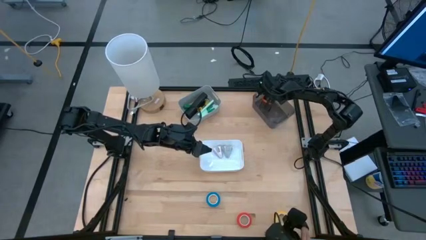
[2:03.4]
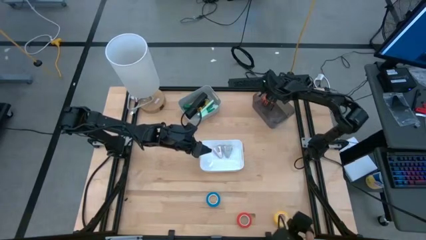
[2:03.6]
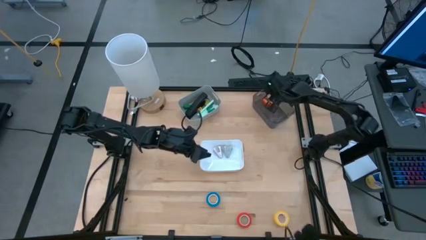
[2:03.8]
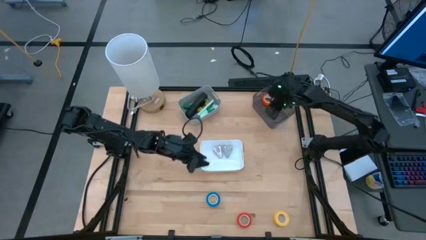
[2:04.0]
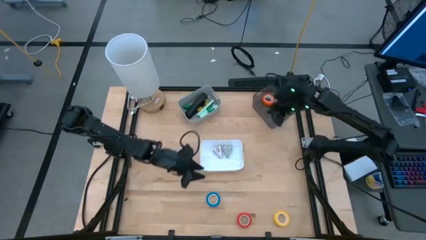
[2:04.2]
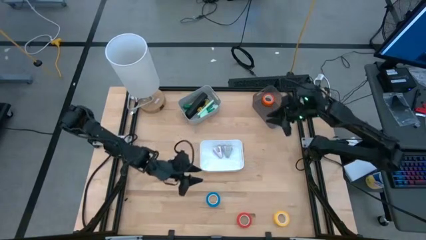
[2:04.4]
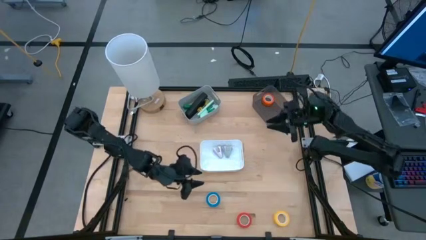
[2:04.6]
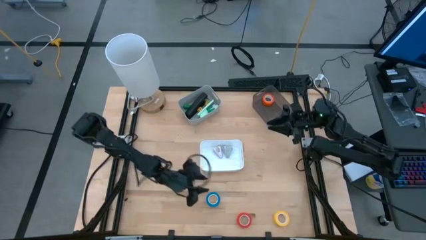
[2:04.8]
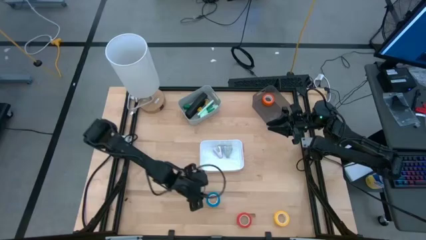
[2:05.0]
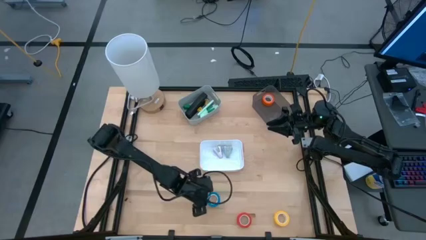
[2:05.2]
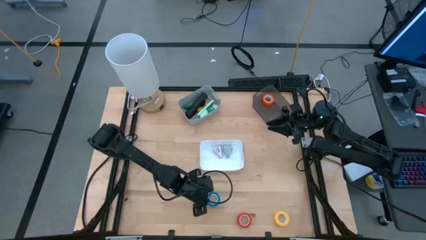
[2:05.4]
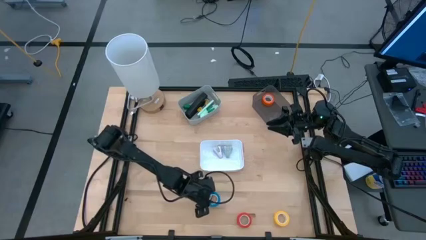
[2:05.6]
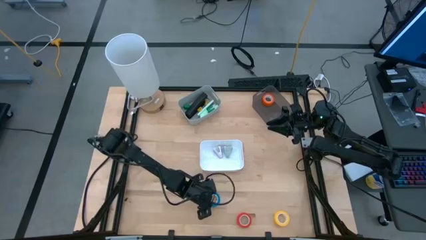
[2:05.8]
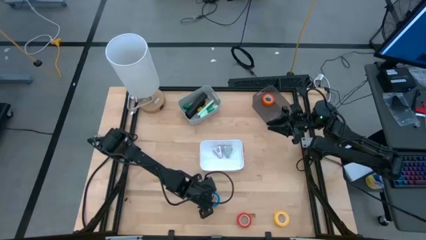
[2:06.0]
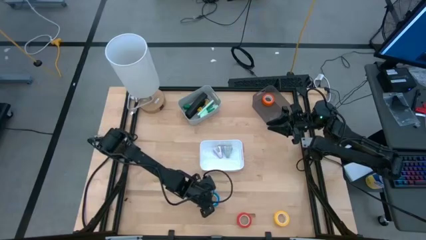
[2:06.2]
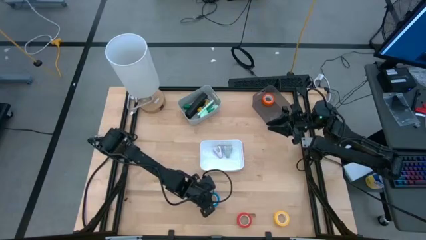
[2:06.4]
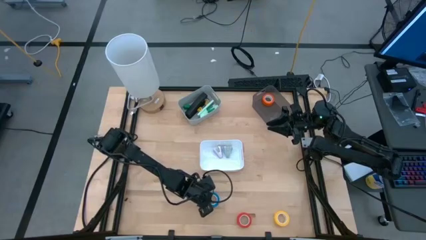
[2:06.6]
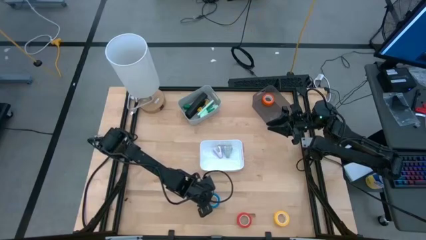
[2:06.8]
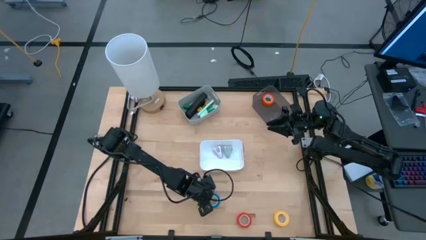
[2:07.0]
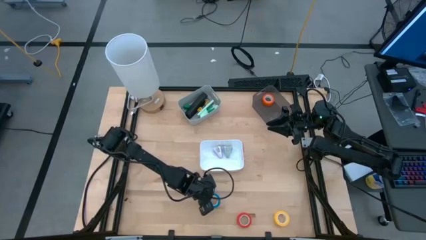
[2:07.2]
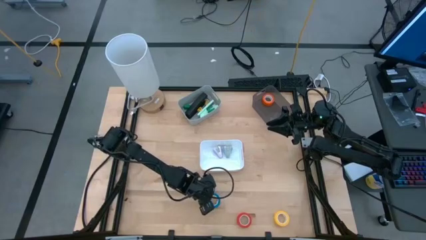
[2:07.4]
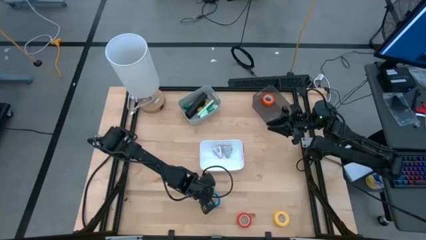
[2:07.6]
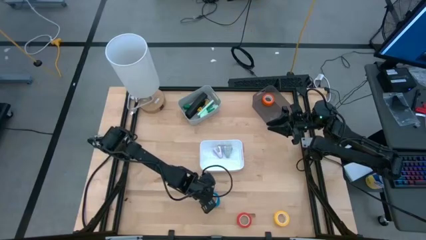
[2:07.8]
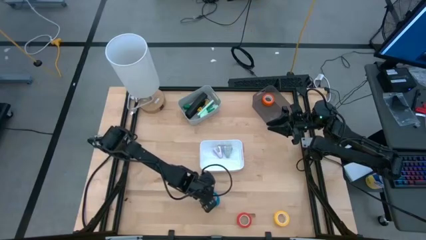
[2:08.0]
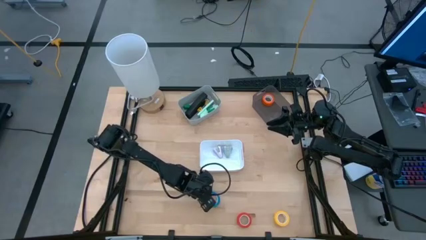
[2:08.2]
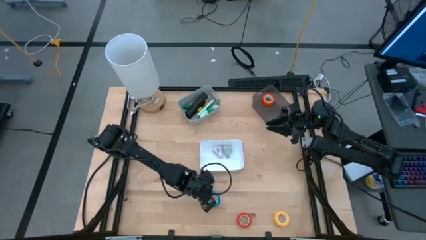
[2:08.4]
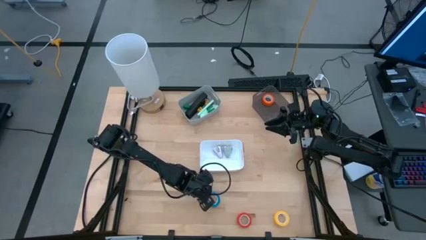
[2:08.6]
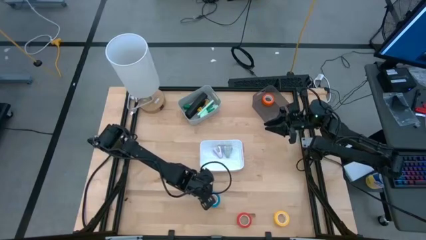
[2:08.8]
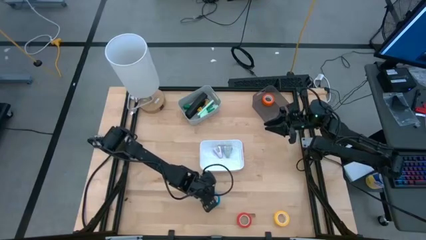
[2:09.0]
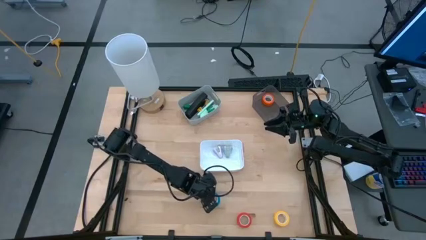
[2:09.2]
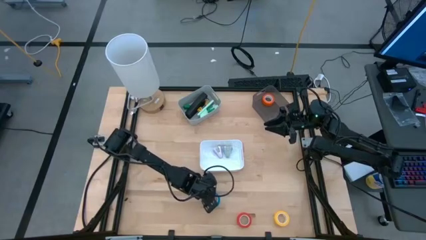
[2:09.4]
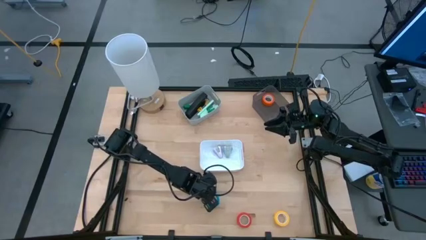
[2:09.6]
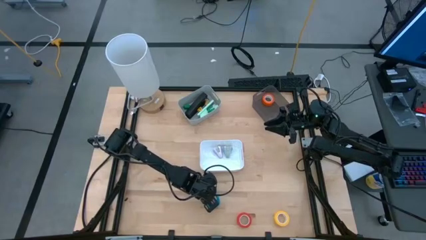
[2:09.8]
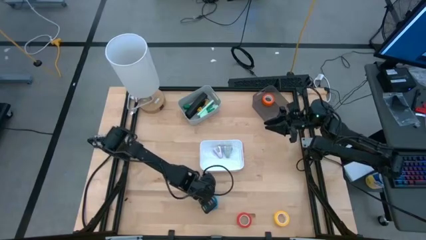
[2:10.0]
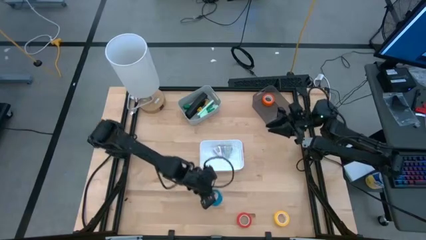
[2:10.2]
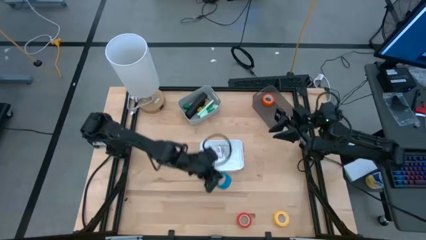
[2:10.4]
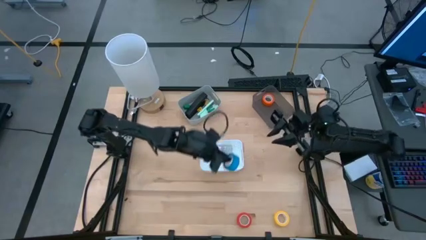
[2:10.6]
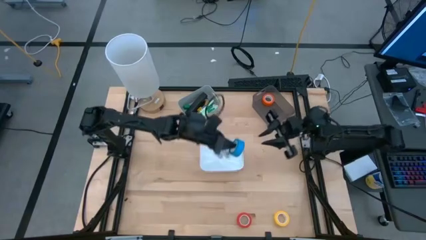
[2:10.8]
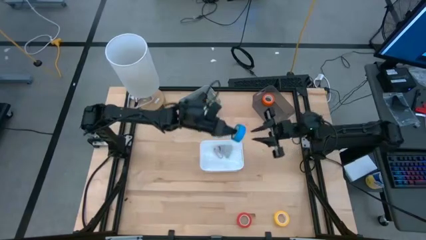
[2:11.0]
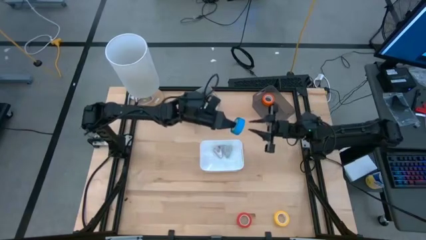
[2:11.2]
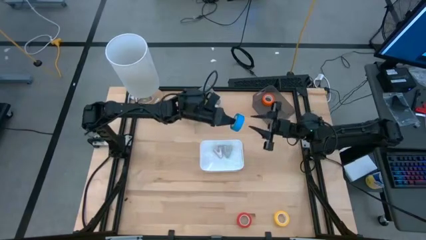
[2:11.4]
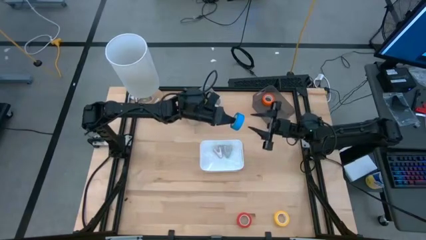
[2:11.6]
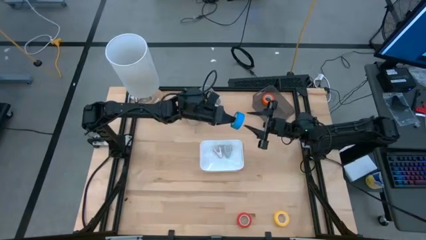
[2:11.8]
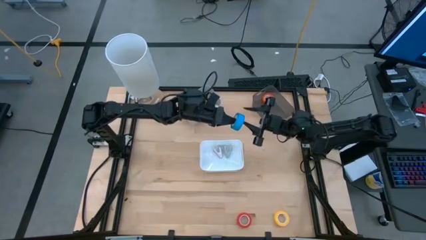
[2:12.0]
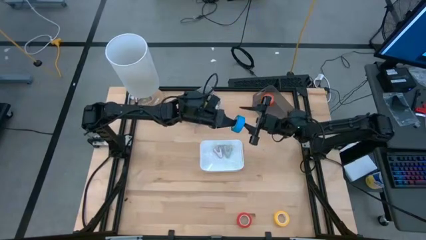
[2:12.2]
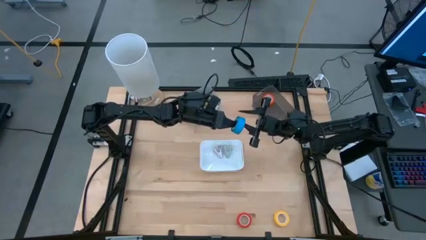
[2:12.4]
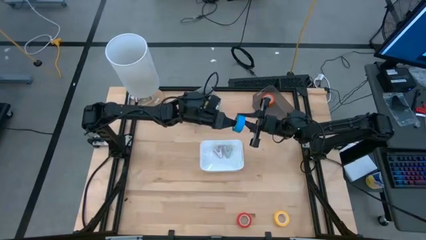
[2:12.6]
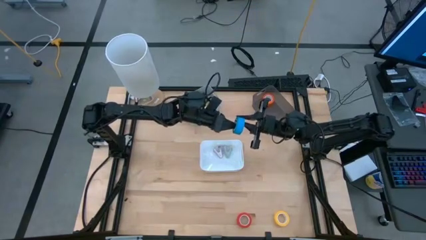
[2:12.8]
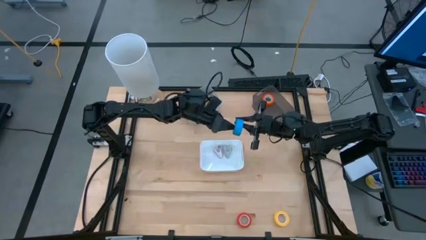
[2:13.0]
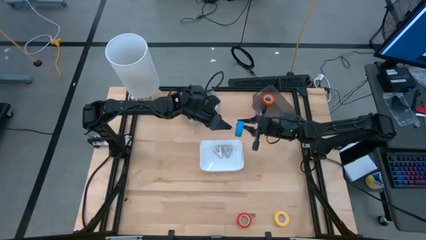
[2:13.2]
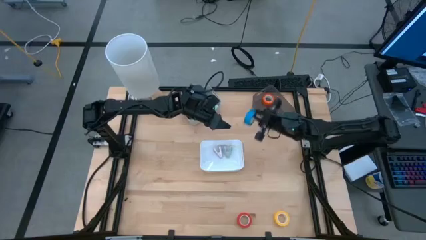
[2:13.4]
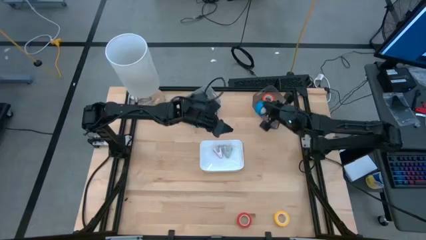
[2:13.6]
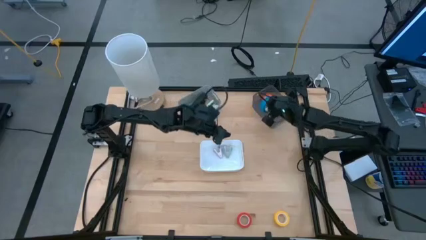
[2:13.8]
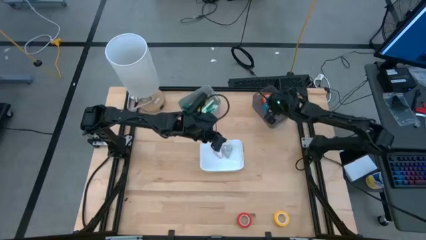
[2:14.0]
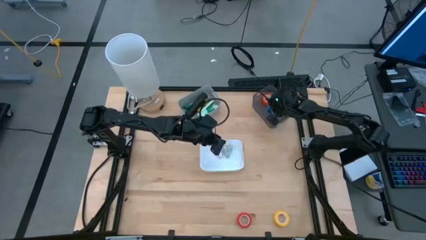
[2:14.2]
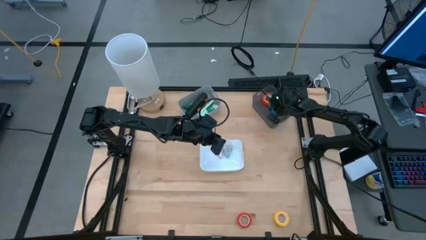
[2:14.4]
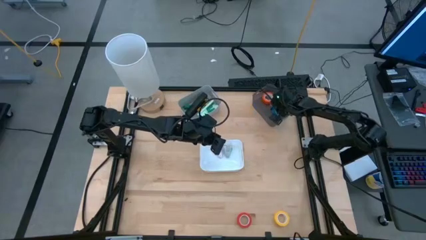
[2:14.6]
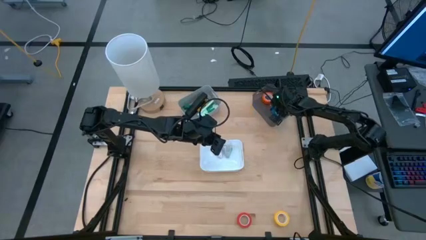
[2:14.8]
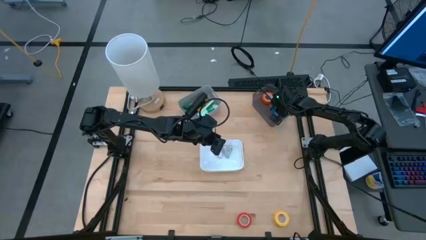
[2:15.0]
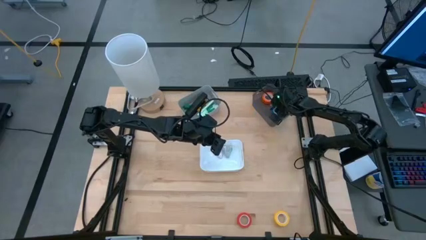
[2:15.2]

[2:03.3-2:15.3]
Task: Pick and place Stapler, Stapler remover, tape
Put the blue tape into the black bin

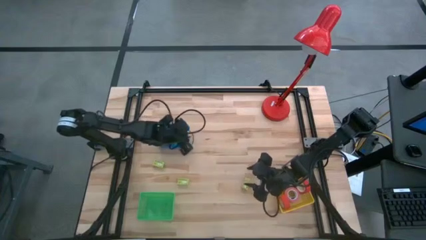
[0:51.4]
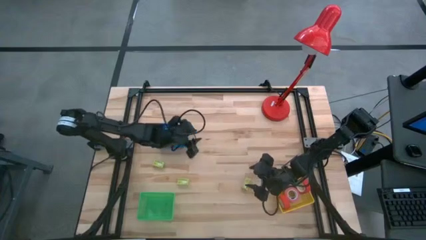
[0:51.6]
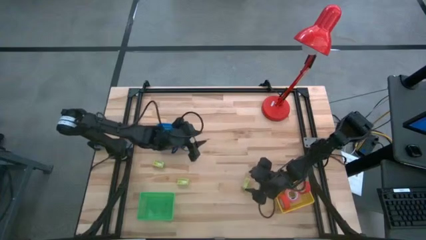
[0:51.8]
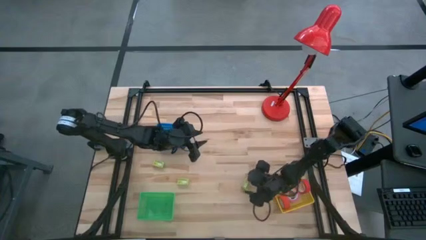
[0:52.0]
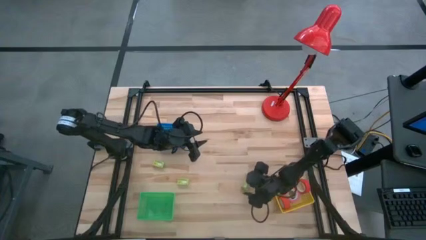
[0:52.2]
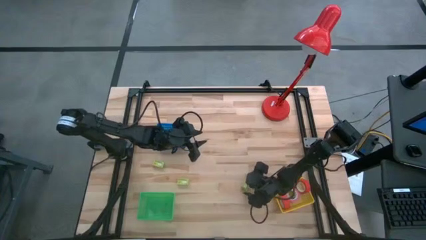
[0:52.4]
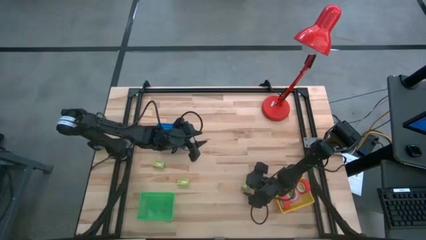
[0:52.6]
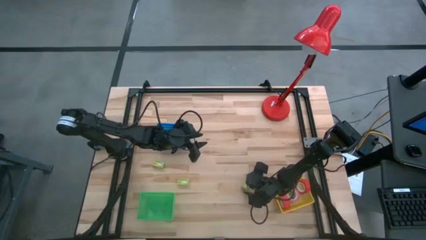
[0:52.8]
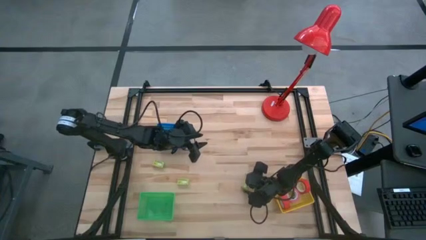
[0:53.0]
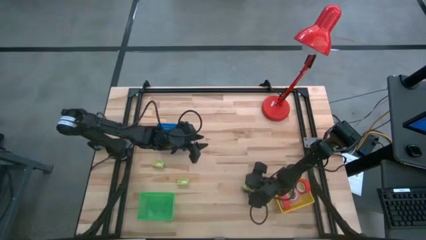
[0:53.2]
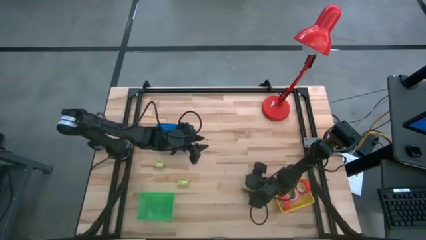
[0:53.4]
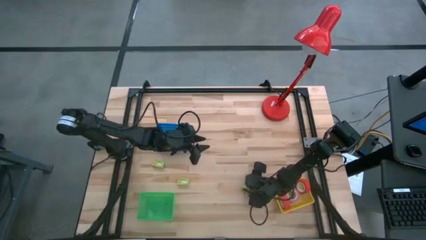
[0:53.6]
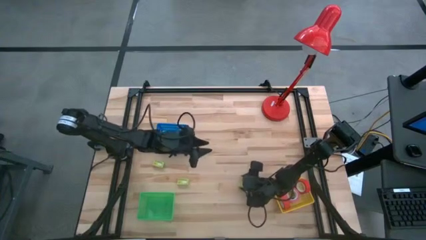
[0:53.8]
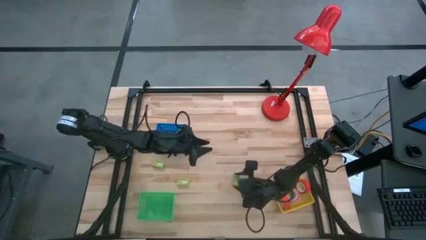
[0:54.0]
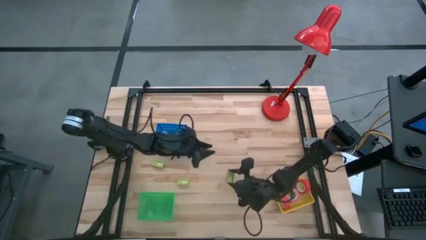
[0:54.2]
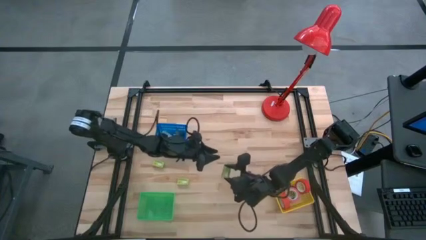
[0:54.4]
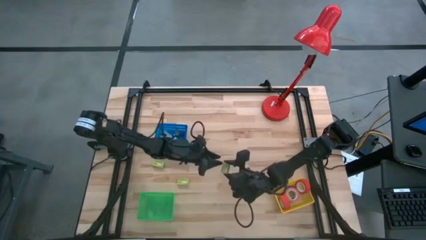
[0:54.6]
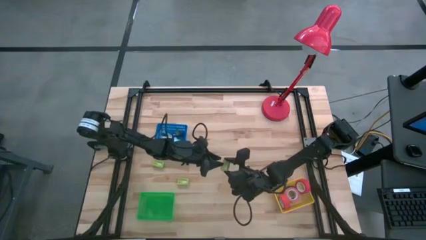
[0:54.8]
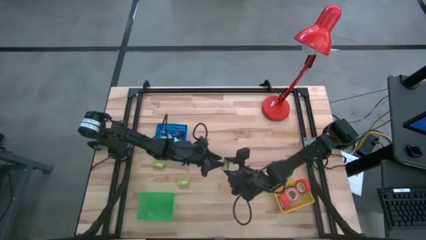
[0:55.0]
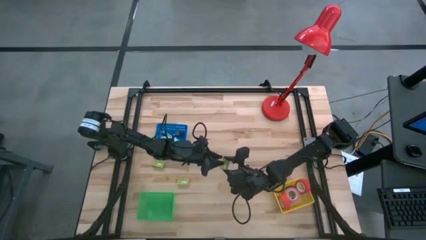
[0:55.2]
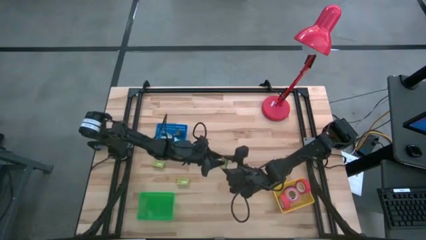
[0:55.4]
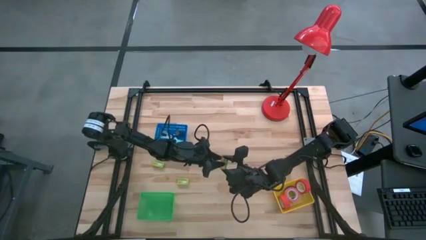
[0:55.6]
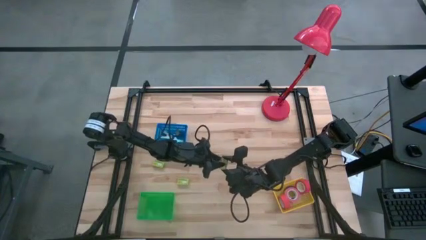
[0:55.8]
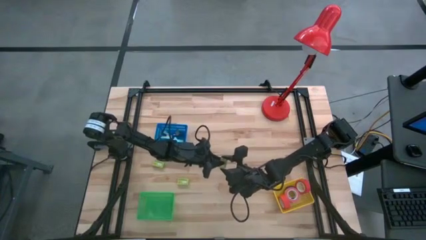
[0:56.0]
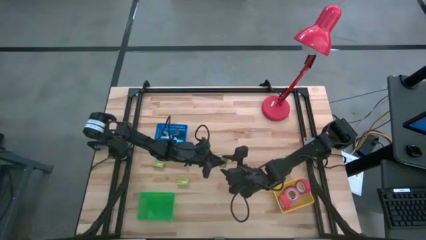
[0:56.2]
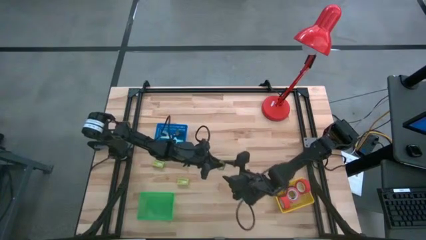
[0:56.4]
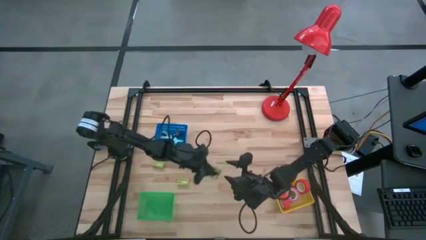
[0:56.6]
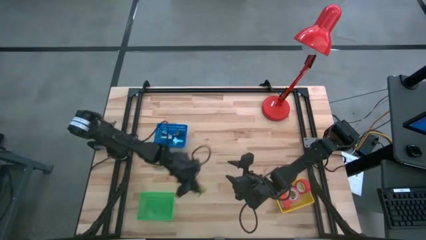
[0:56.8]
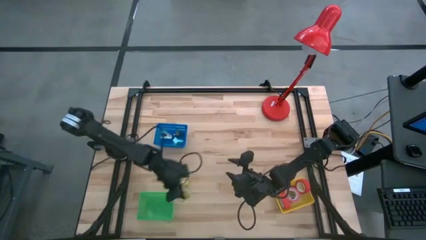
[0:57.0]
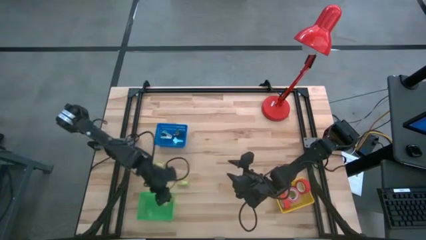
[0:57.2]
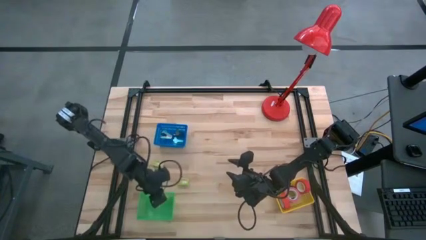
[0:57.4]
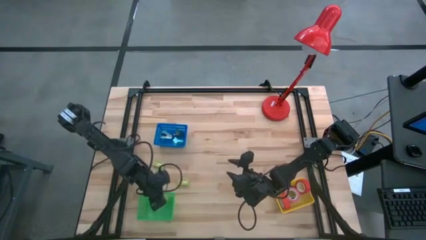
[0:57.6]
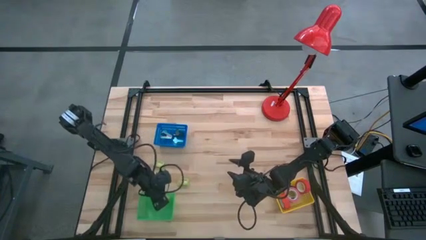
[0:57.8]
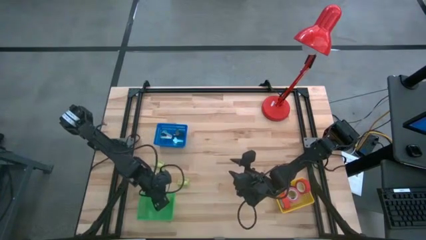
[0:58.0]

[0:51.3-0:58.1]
Task: Pick and place Stapler, Stapler remover, tape
Put the right green stapler pin box into the green bins
